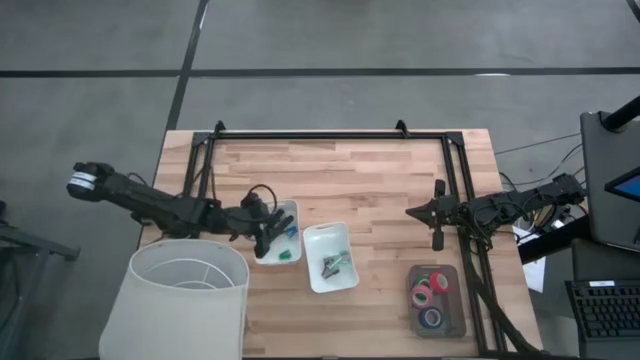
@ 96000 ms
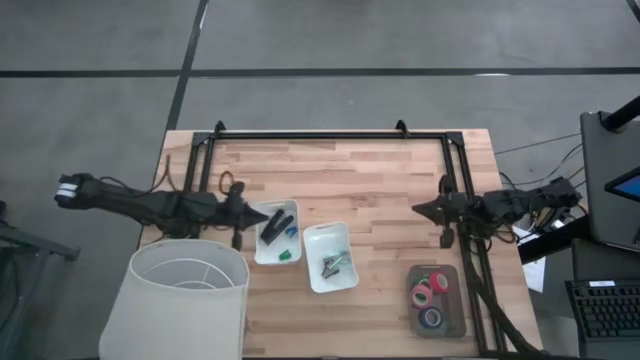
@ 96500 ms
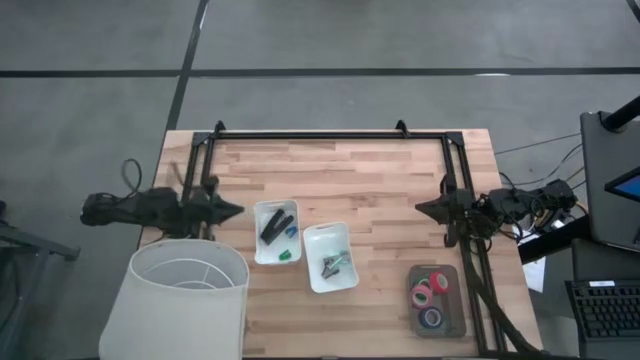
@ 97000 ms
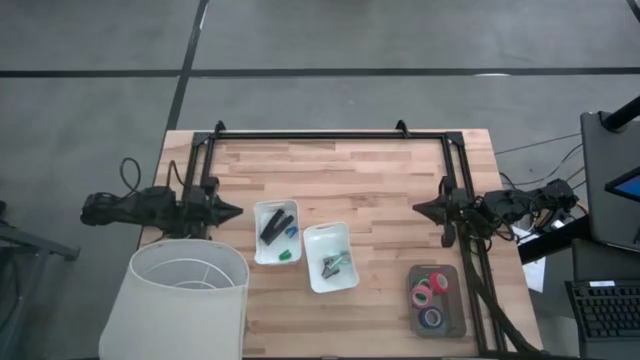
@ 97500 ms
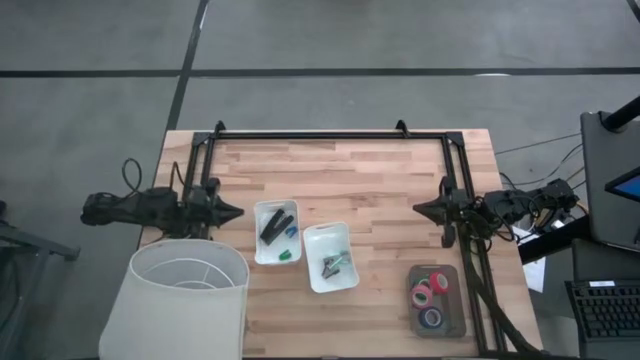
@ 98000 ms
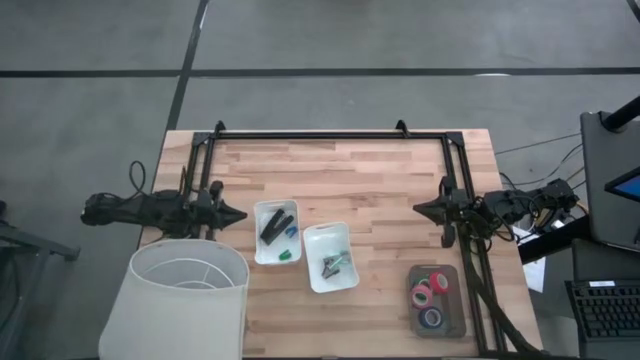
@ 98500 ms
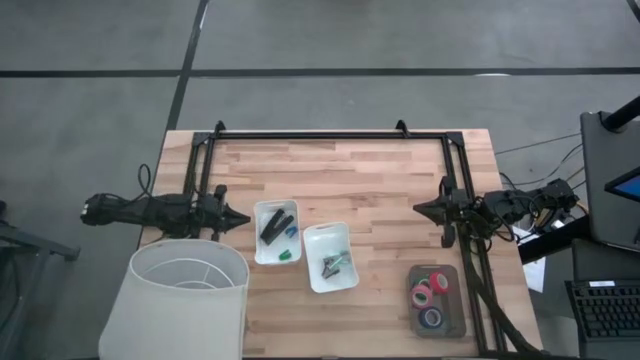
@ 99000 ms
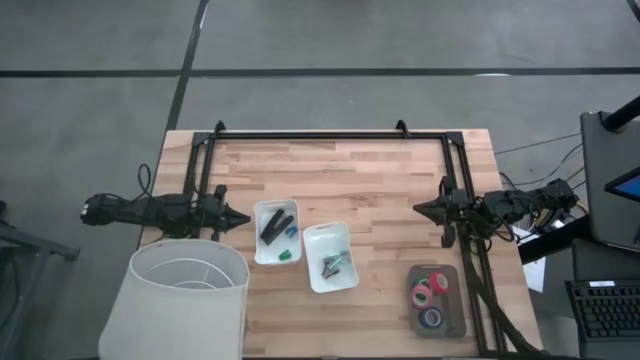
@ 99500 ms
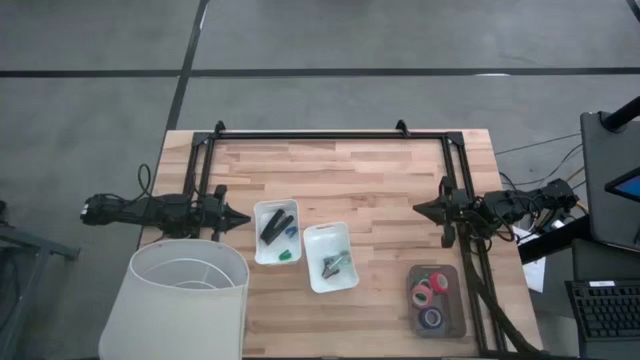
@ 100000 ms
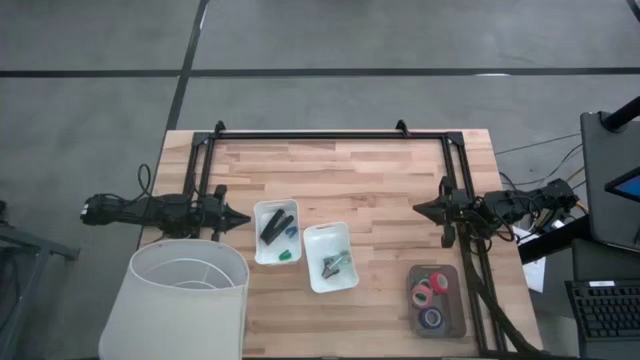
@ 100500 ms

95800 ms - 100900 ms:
Task: Pick and place Stapler, Stapler remover, tape
Return to Home Position

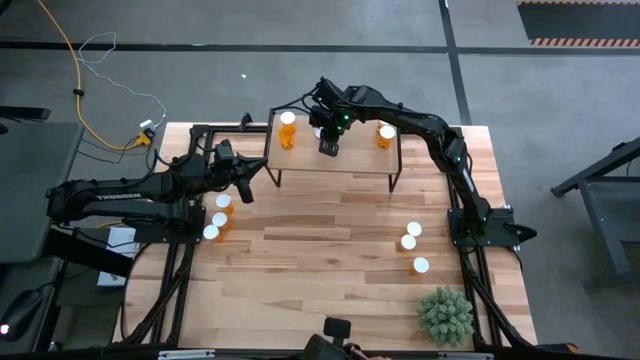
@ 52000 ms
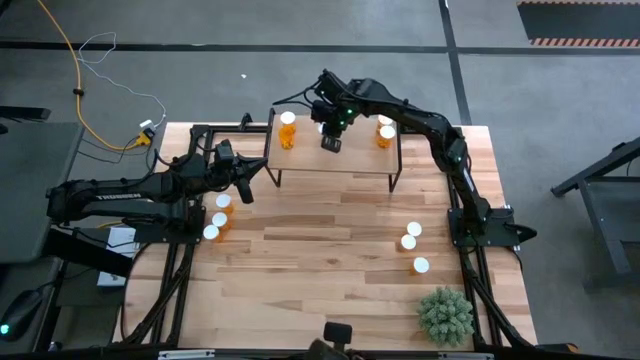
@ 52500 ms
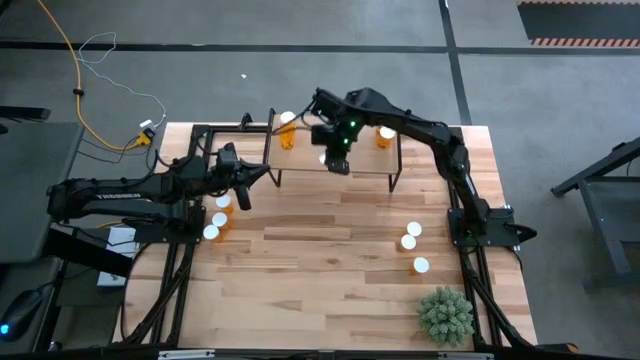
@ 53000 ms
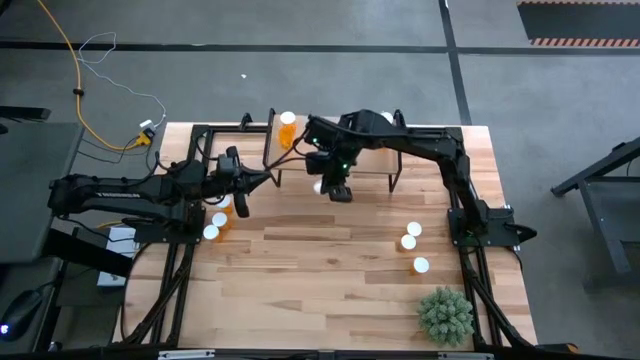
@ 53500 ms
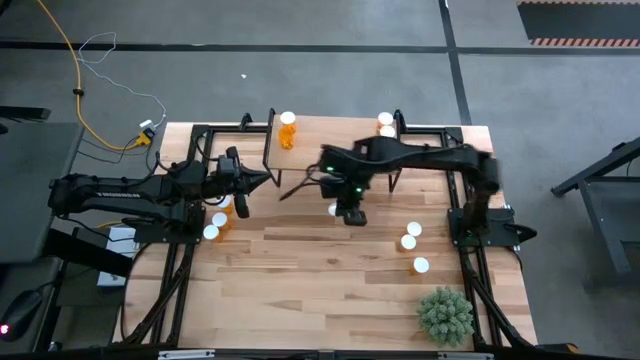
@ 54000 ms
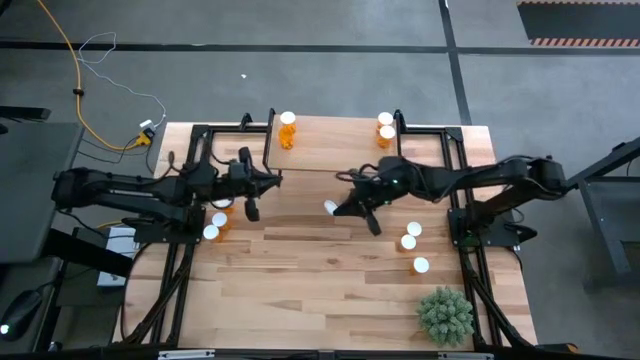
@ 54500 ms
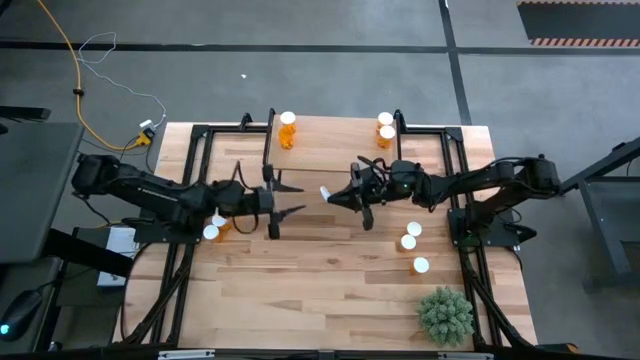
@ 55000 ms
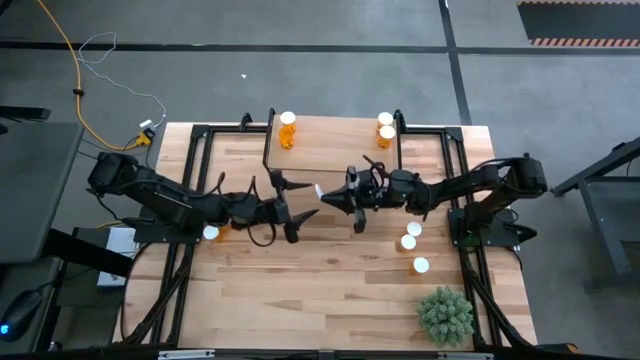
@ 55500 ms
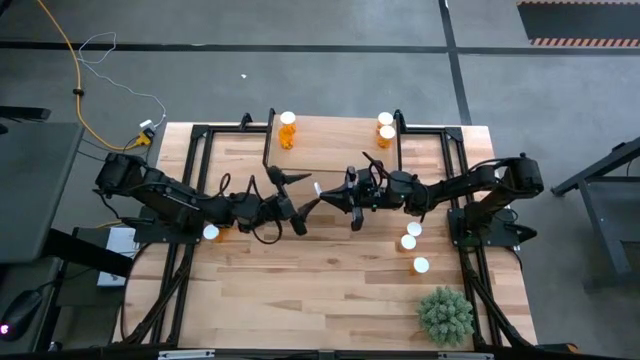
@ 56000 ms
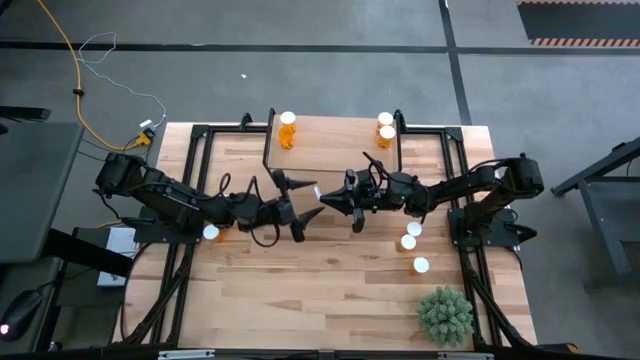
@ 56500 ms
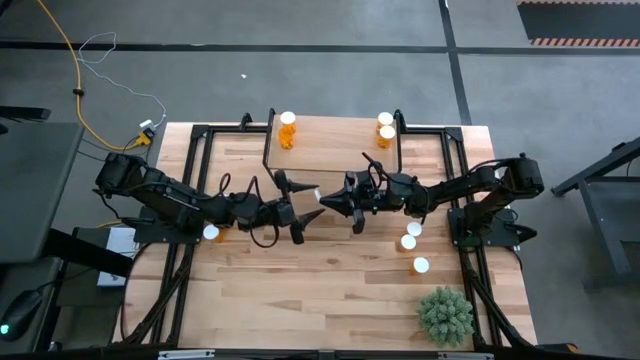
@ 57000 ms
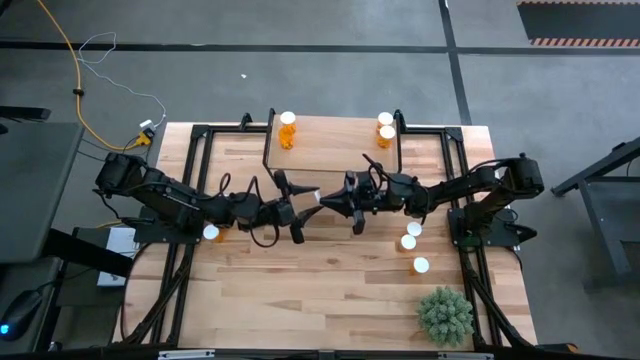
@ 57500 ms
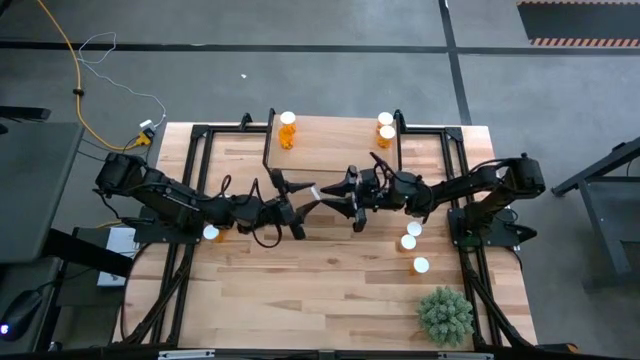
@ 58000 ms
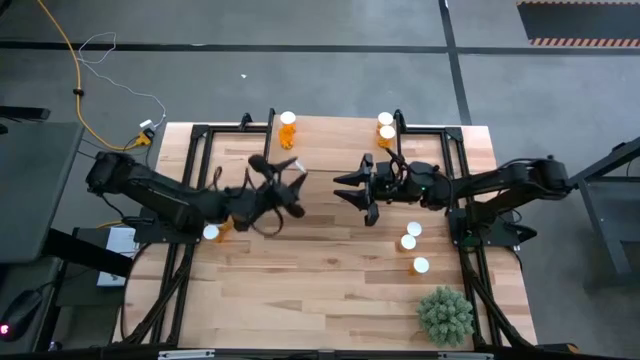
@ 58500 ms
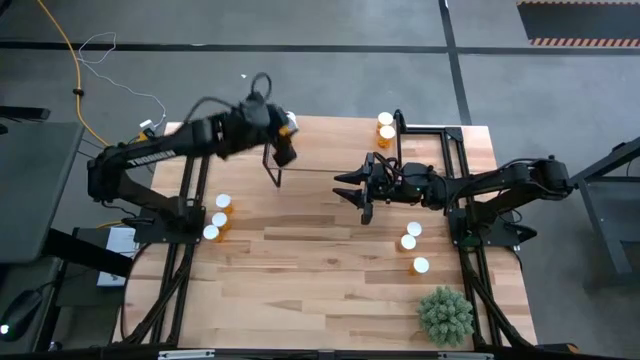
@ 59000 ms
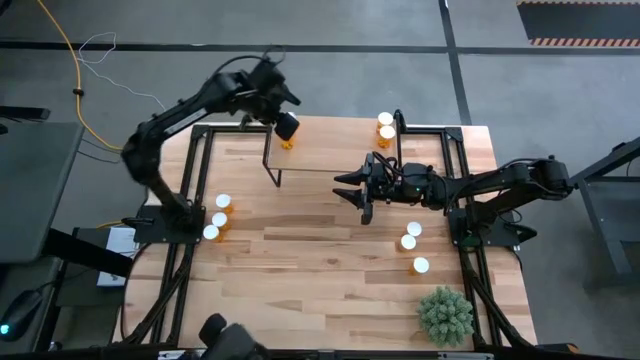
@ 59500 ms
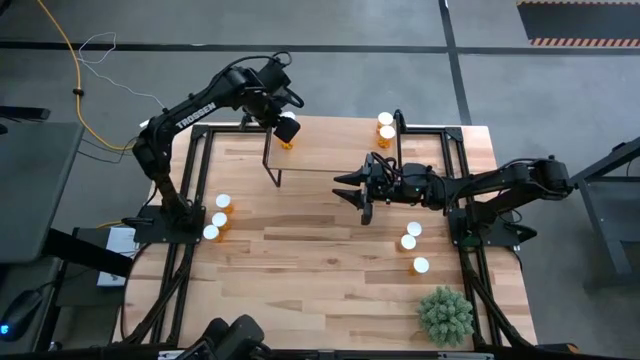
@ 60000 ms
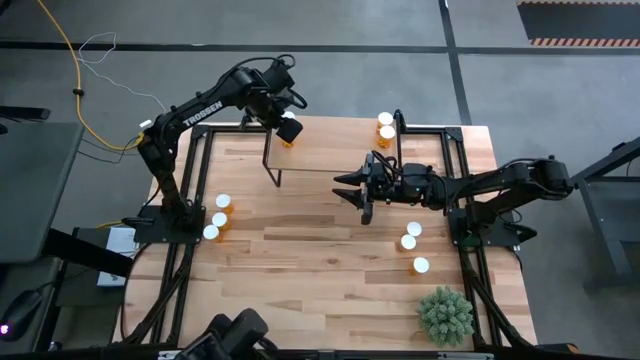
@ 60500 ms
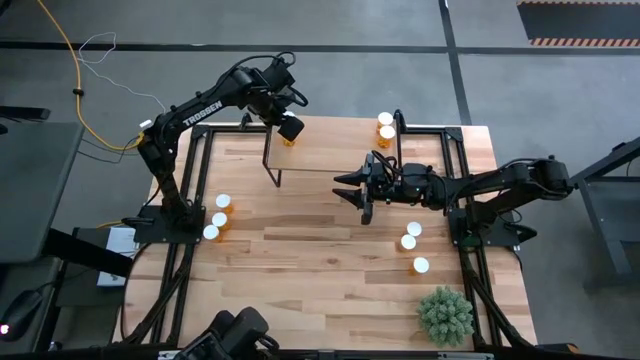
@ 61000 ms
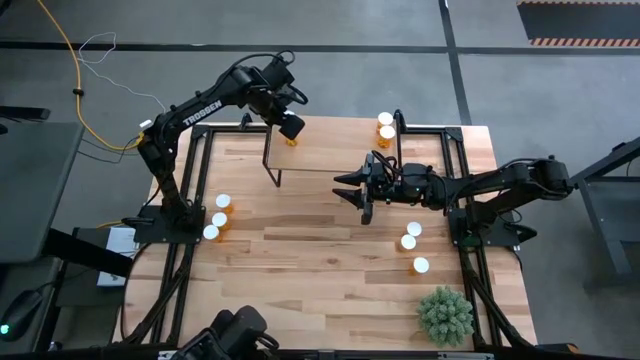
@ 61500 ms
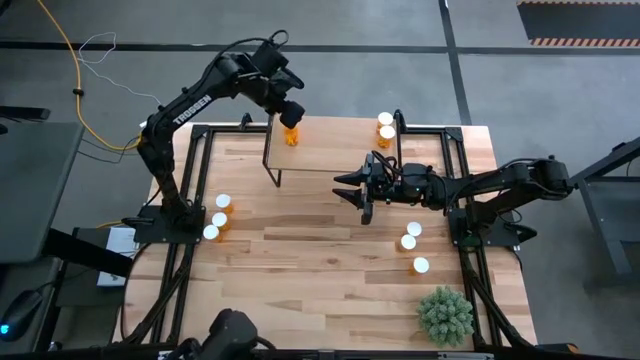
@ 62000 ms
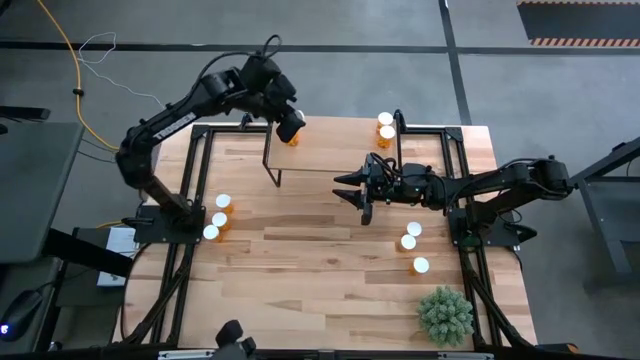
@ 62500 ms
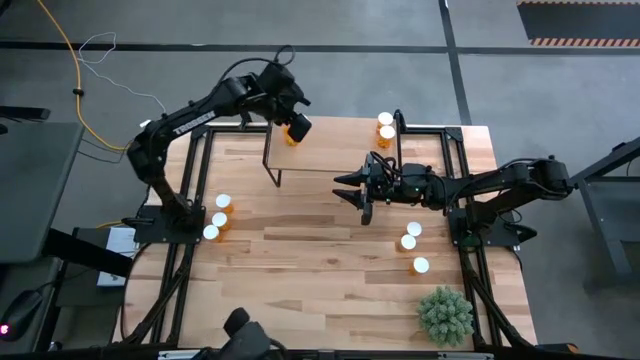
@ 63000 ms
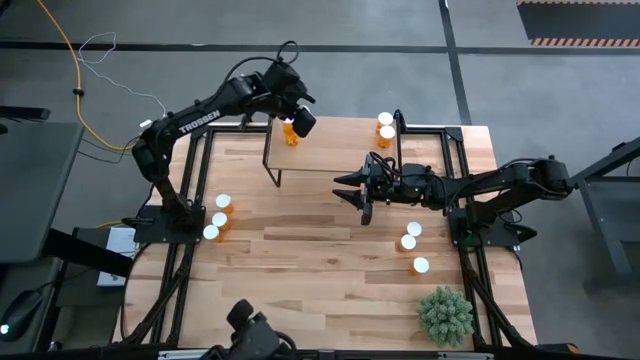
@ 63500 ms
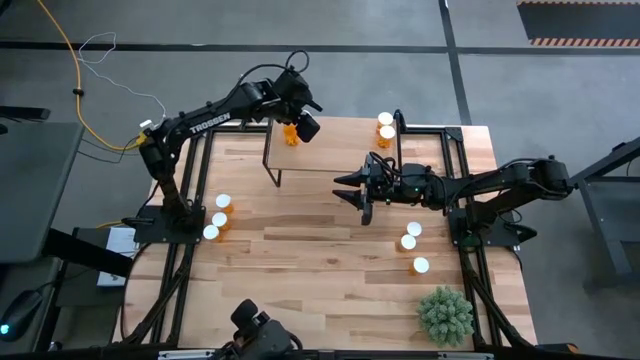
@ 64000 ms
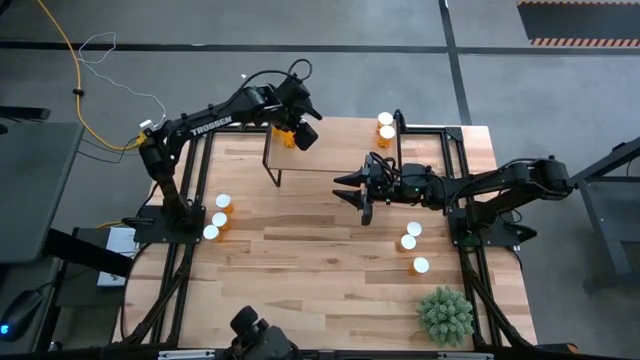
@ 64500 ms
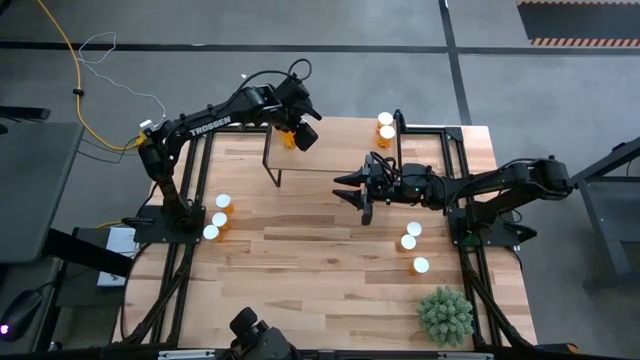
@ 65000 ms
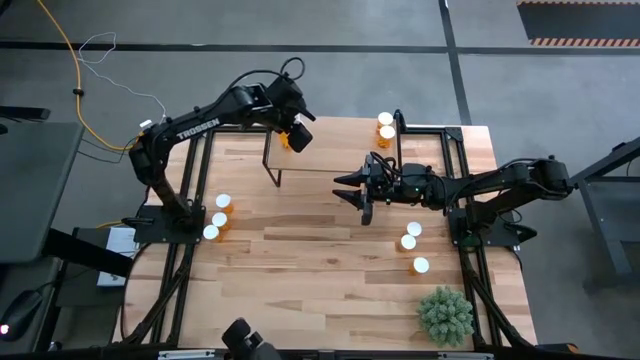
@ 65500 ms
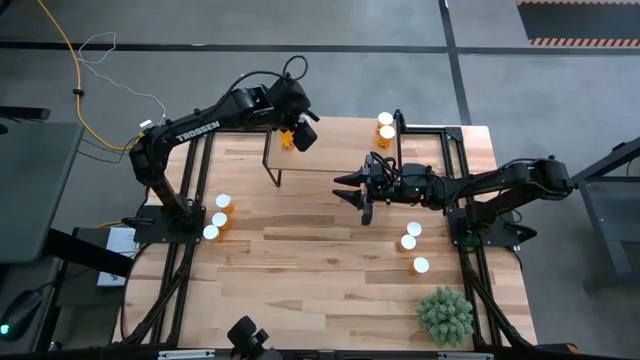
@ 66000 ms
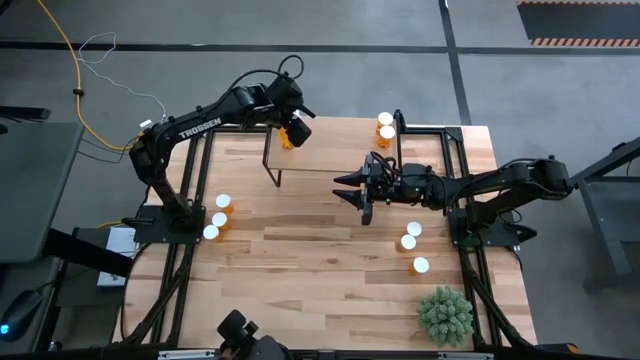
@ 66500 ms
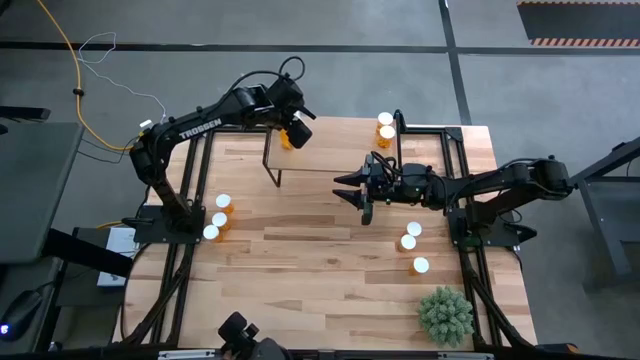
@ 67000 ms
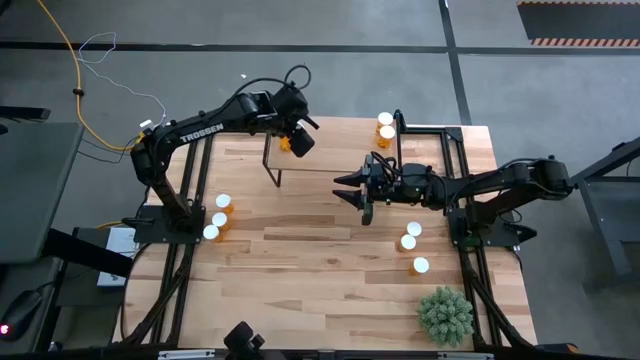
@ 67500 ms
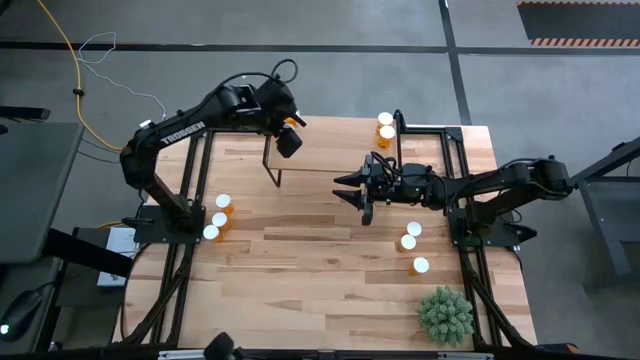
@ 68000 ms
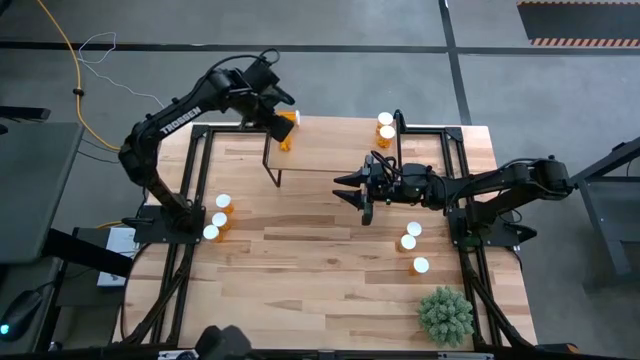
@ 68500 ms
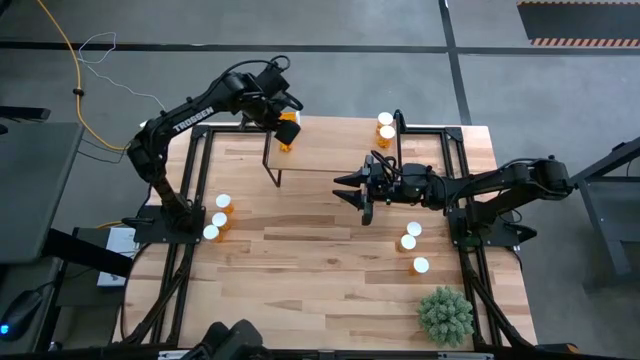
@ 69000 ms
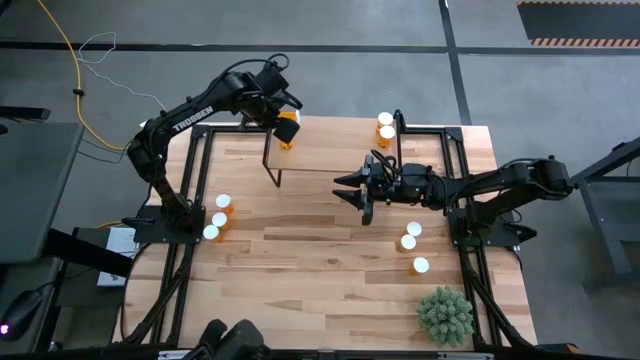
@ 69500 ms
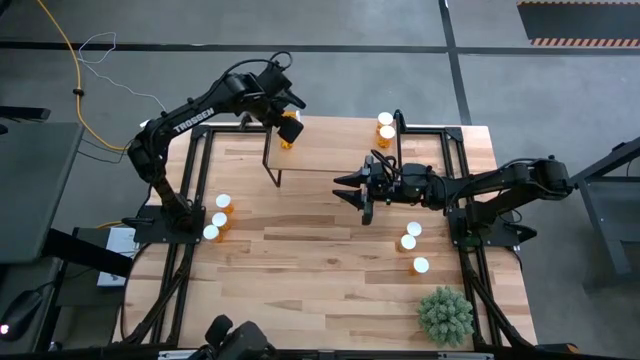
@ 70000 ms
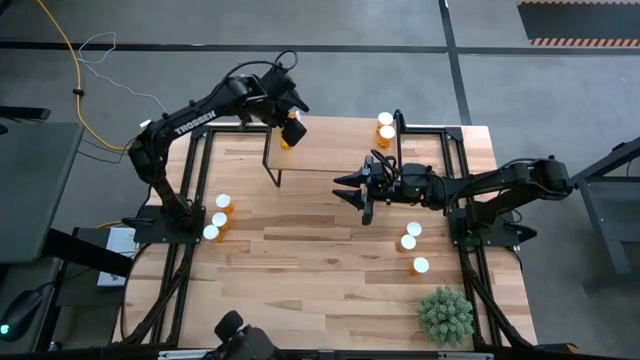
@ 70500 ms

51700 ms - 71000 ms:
Task: Pick and place medicine bottles onto shelf by color
Put the yellow pill bottle on the shelf
